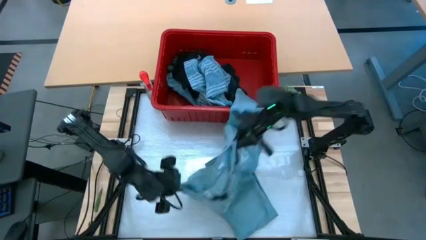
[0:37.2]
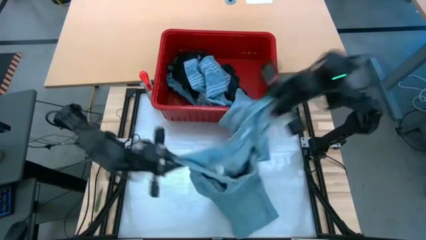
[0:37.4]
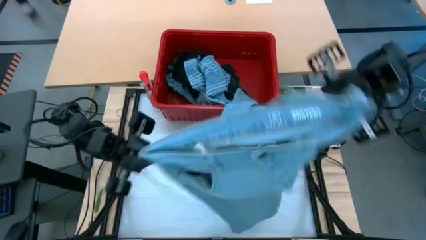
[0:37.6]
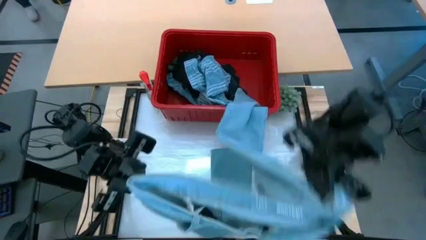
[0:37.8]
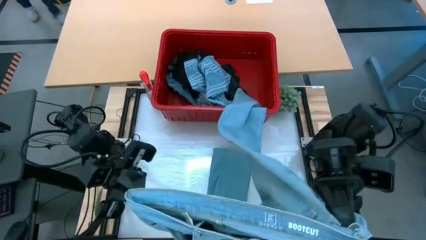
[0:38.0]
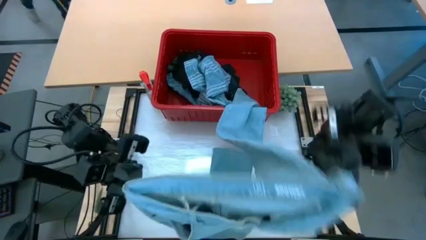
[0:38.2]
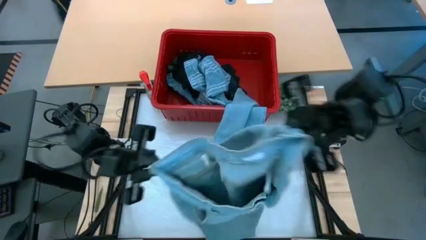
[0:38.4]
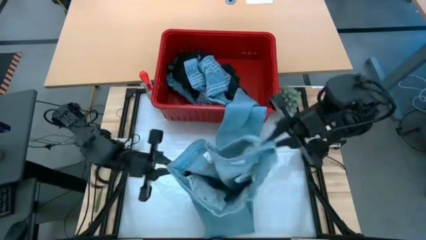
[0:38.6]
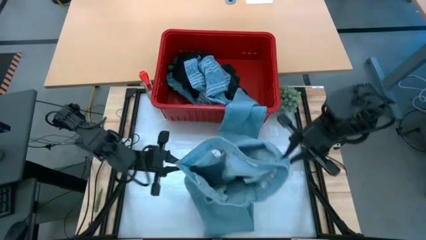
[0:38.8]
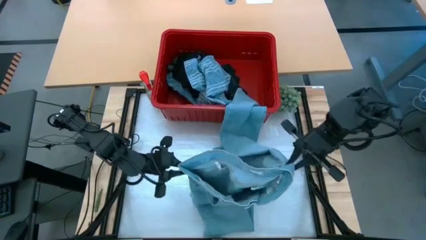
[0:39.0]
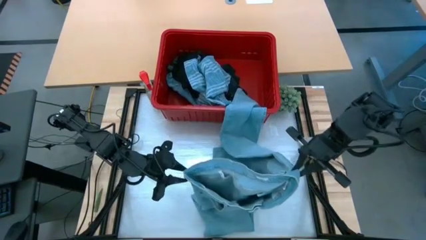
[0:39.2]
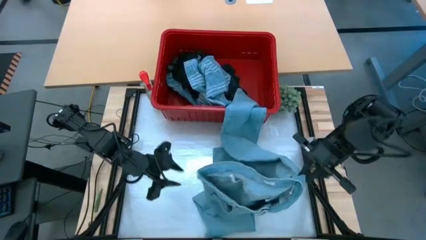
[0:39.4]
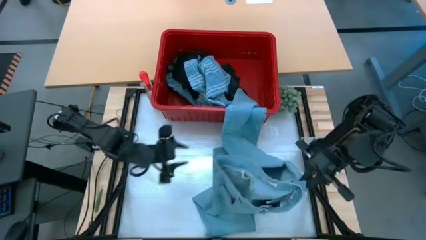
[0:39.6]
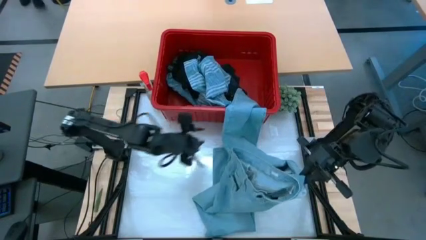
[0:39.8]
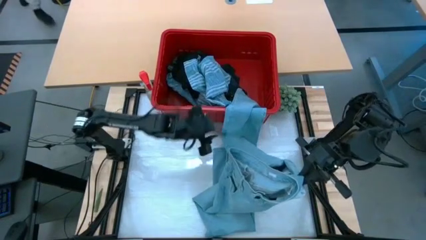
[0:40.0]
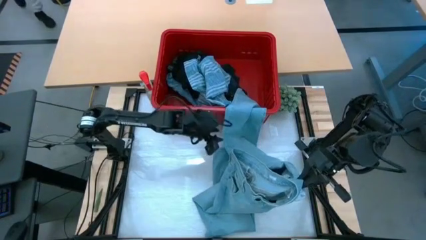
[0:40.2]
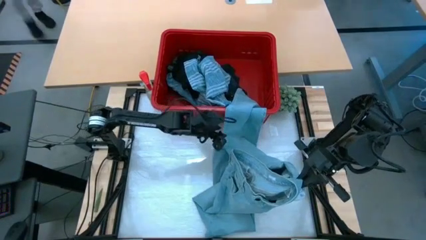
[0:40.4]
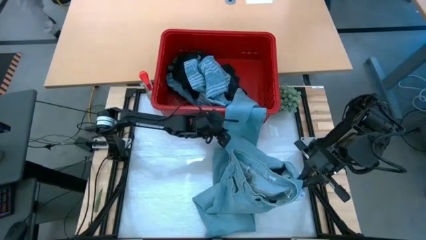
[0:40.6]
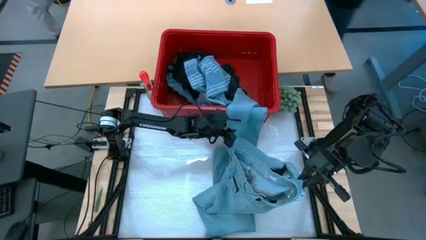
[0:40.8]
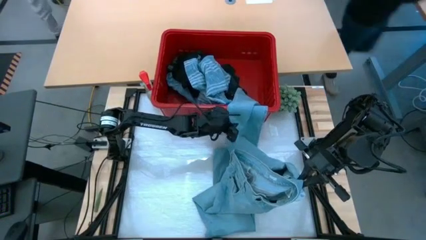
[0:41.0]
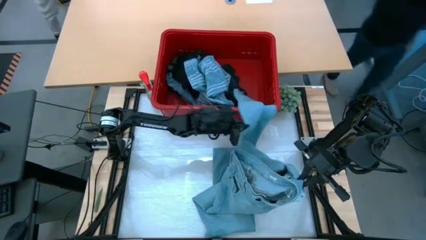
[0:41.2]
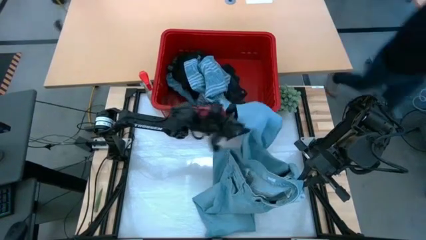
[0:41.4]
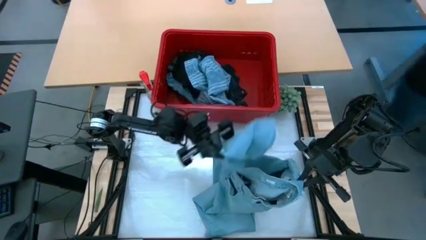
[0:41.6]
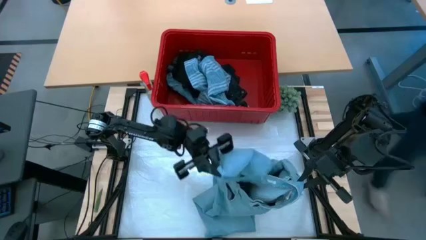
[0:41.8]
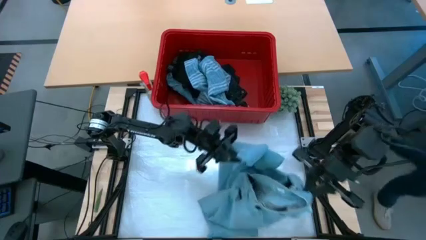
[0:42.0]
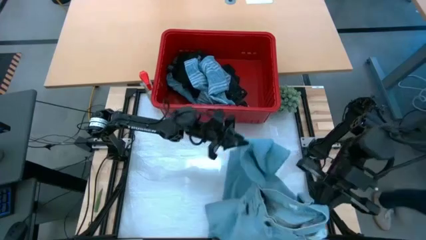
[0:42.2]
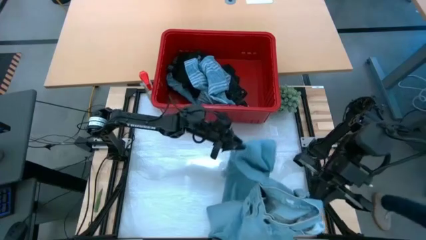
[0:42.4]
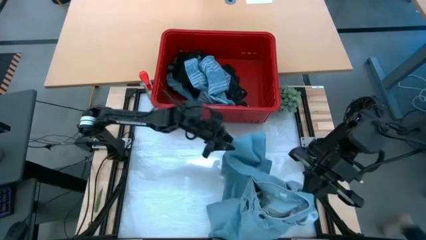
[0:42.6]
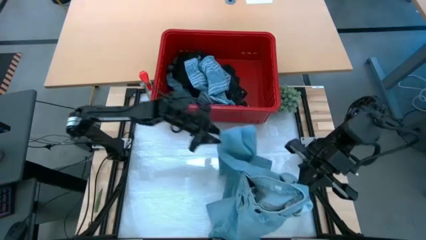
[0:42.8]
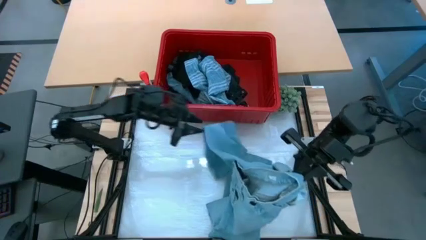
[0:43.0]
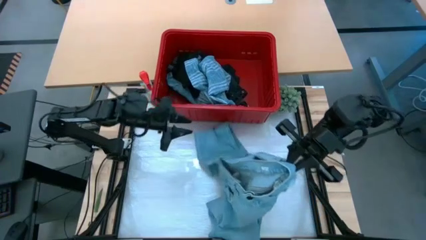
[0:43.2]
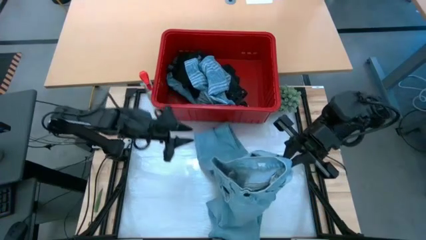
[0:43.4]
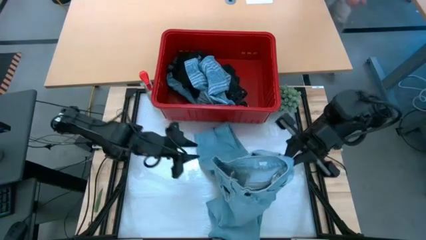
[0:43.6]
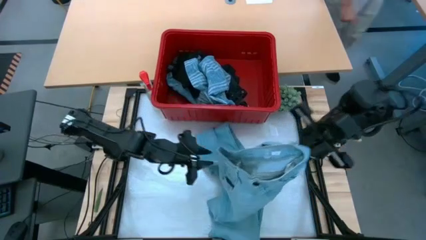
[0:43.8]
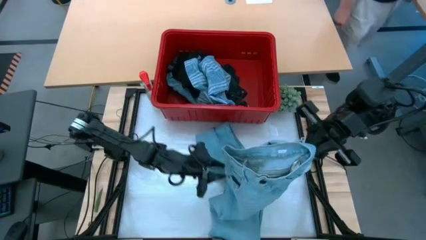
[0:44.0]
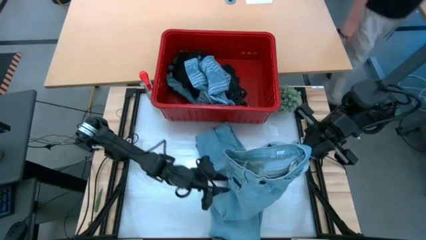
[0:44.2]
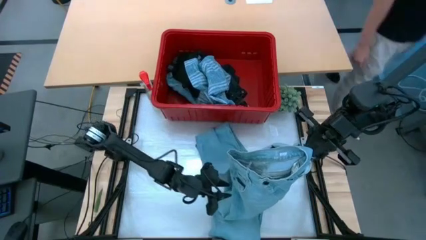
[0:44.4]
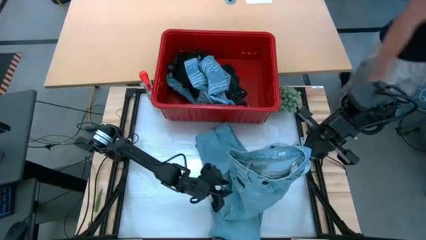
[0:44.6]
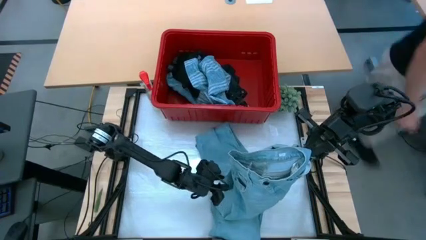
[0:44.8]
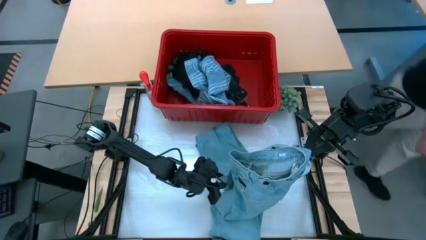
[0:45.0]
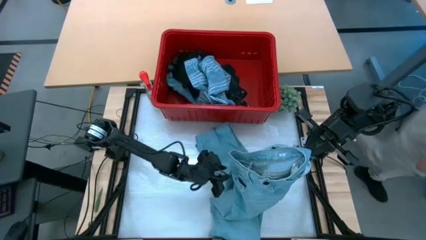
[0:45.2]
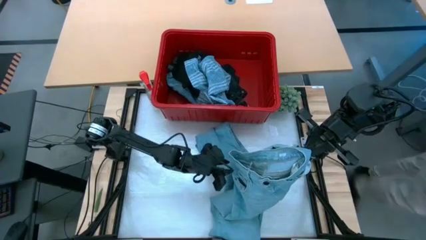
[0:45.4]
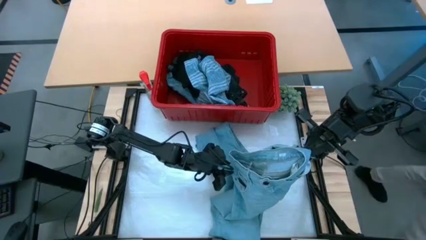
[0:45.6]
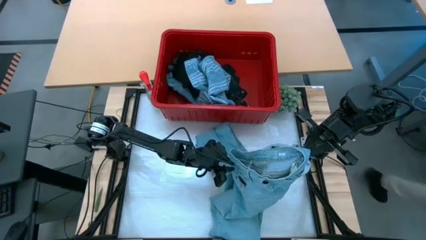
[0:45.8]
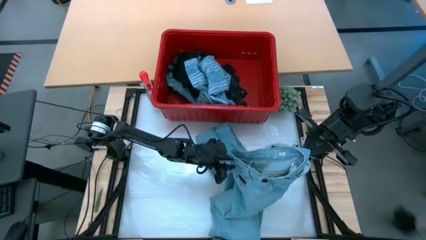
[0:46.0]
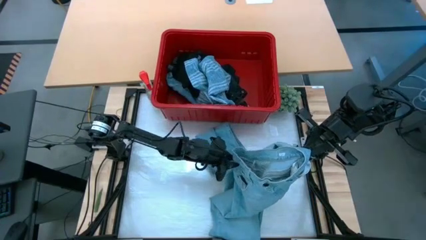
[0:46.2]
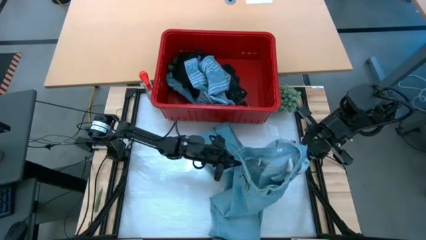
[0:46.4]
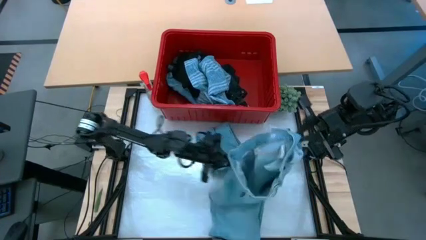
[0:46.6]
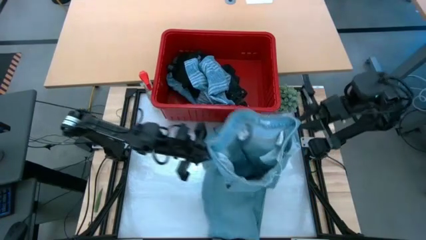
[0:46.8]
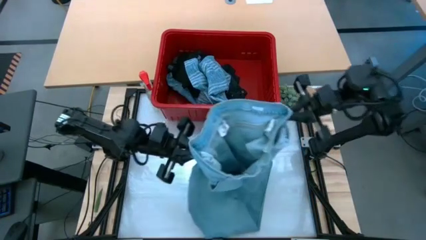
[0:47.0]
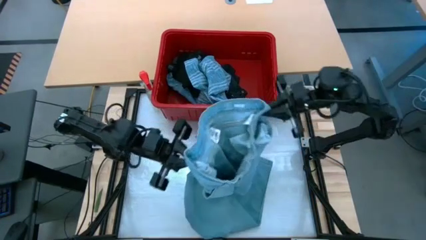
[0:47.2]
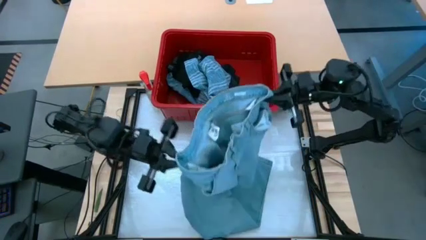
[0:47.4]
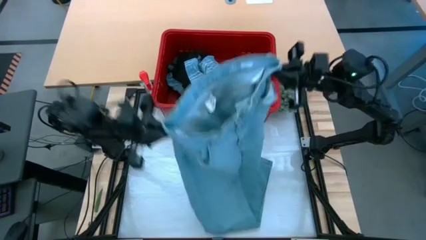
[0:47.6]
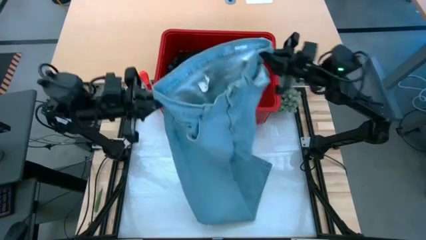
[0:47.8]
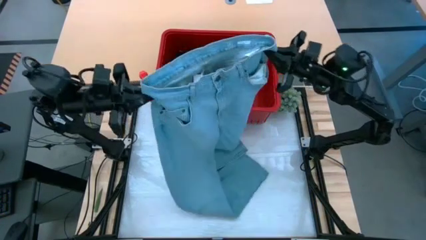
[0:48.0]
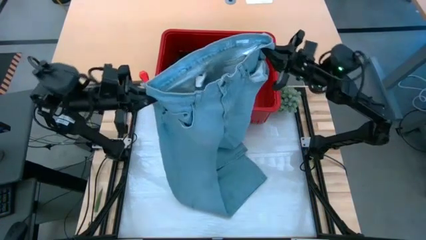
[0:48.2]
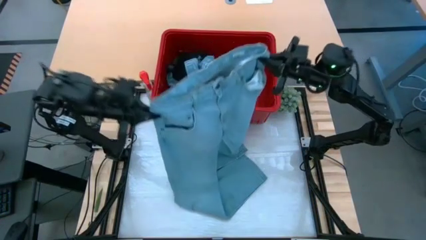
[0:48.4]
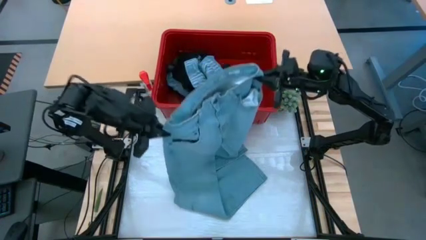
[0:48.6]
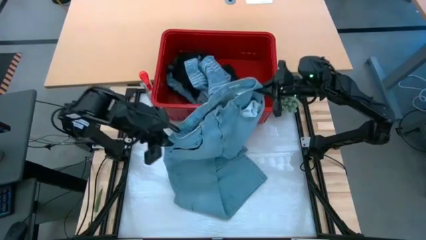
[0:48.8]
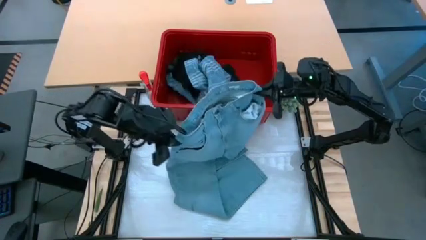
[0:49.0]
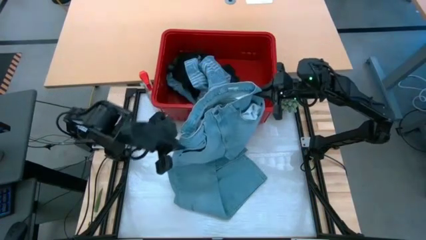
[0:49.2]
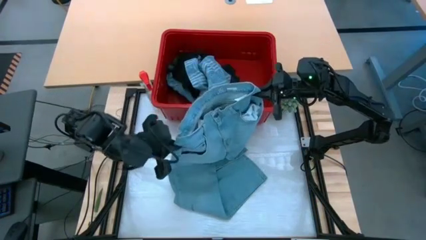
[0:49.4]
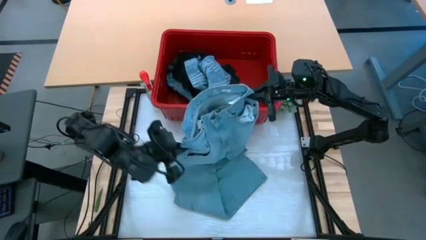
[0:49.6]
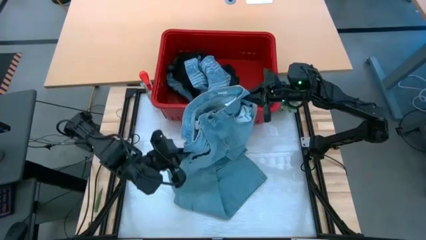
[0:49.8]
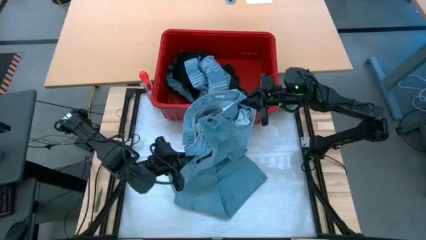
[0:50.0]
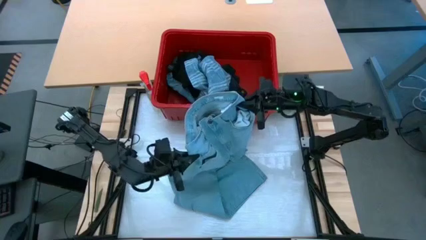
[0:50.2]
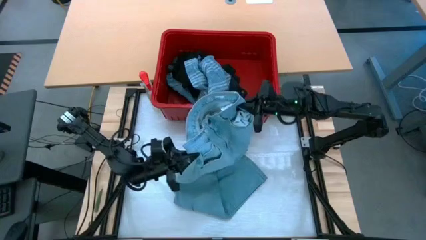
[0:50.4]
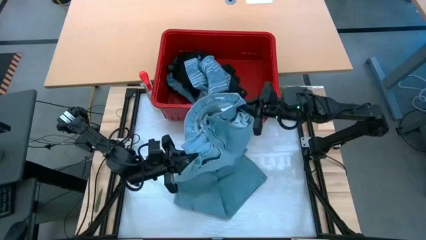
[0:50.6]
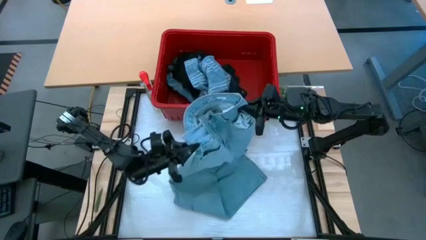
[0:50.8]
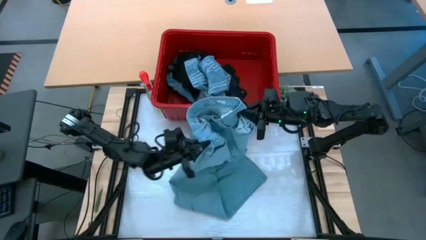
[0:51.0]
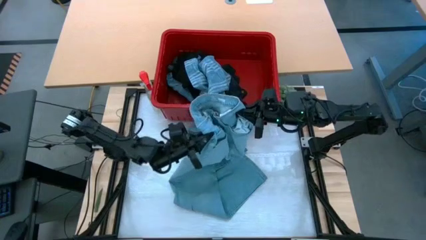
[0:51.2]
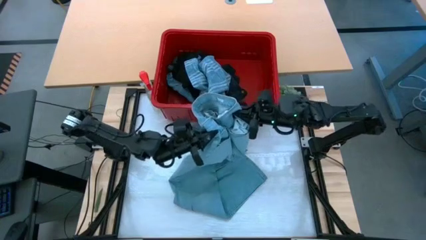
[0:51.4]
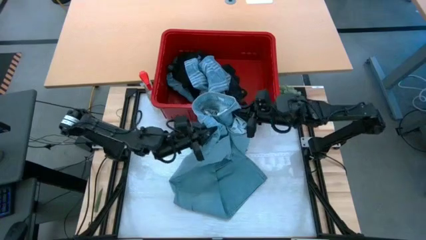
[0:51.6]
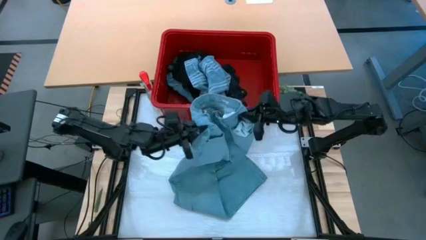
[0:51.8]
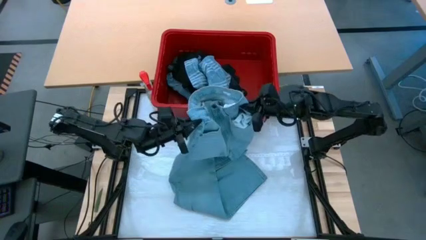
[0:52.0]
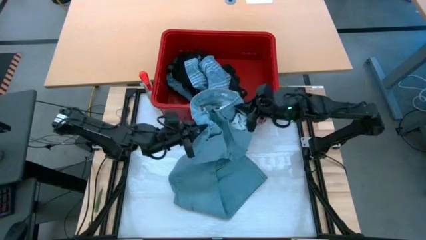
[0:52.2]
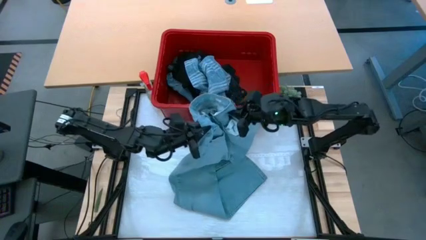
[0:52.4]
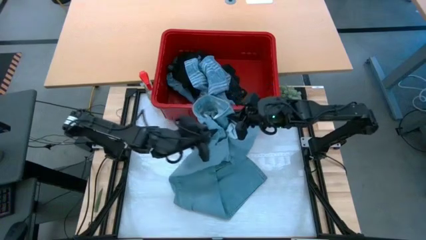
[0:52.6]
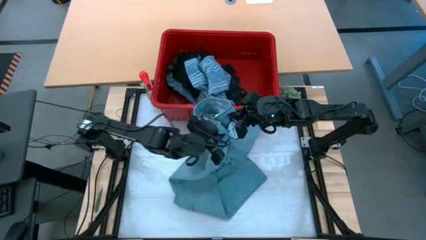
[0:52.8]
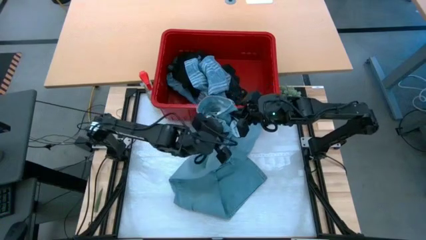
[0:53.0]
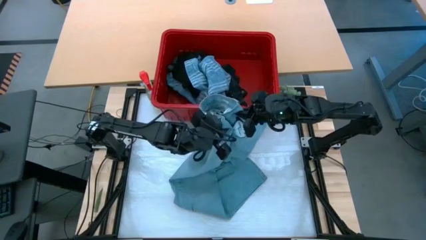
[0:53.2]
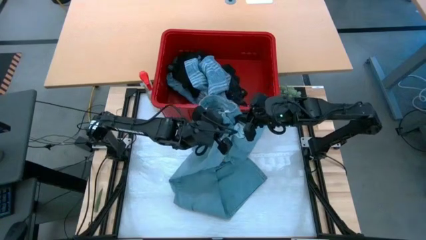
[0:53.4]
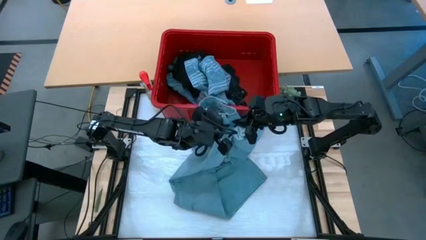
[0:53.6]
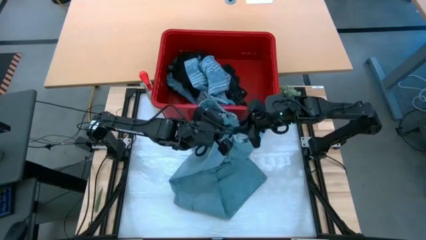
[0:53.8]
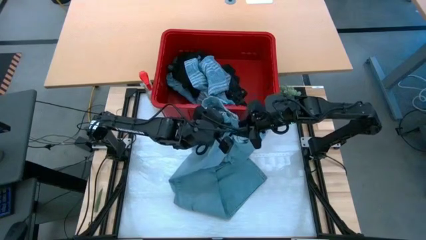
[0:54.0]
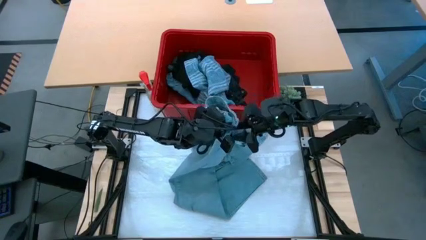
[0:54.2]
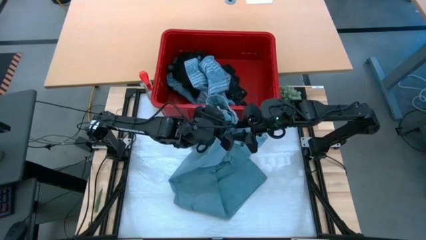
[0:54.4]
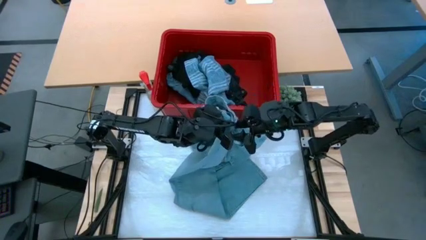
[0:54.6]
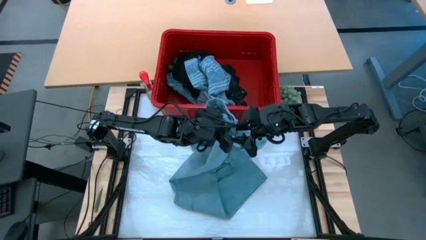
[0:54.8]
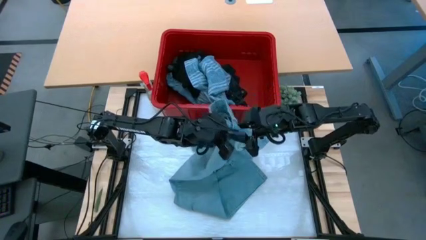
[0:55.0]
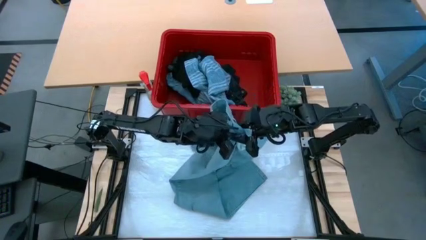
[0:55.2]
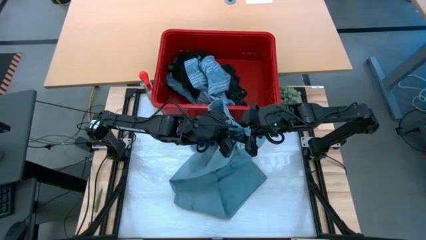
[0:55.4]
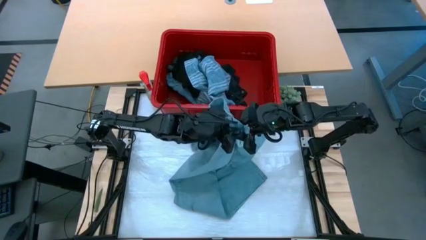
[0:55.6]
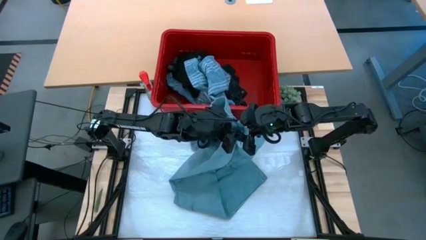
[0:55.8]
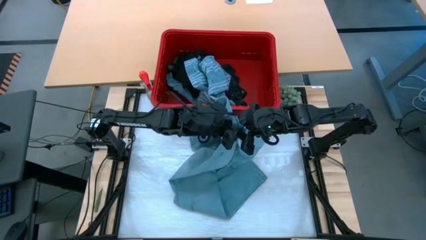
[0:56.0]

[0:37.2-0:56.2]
Task: Fold Laundry from Bin
Fold the light blue pants
